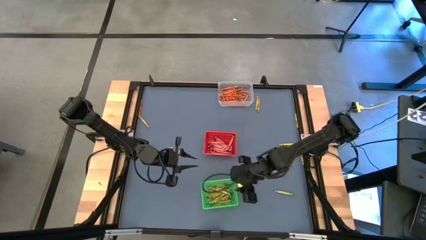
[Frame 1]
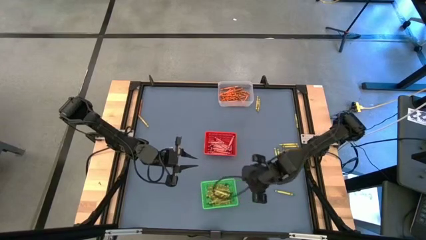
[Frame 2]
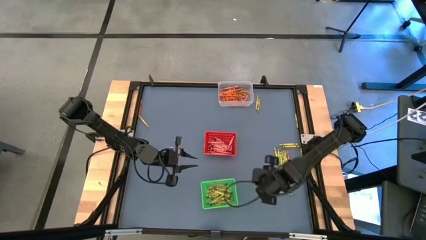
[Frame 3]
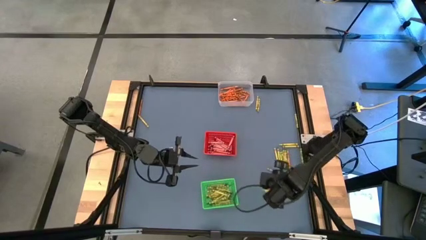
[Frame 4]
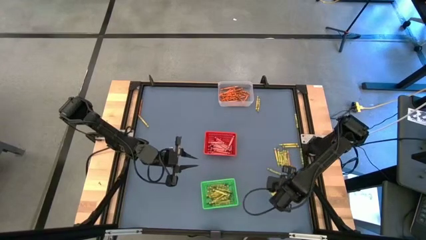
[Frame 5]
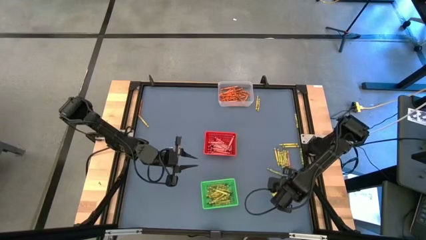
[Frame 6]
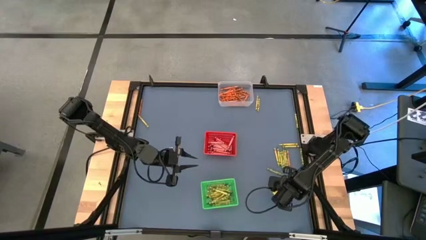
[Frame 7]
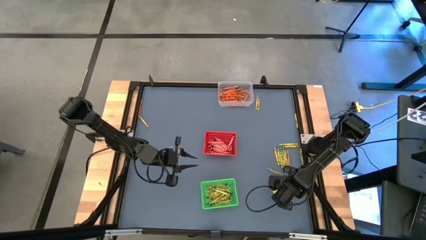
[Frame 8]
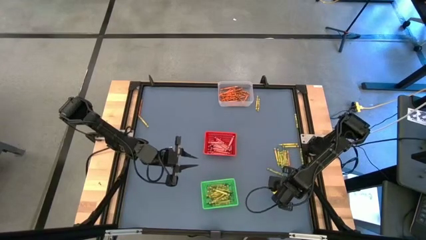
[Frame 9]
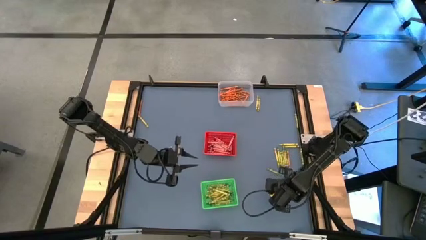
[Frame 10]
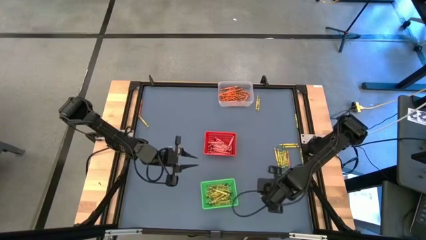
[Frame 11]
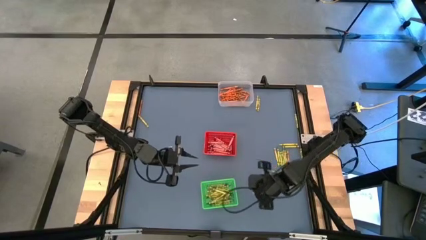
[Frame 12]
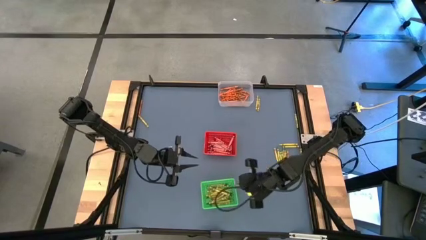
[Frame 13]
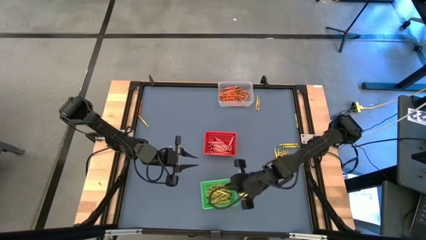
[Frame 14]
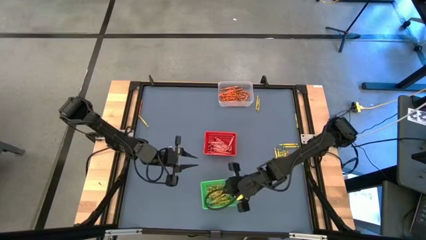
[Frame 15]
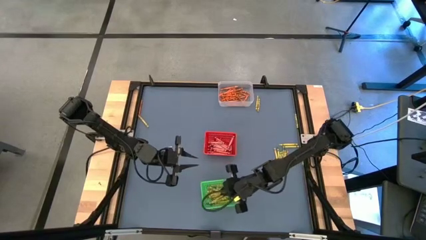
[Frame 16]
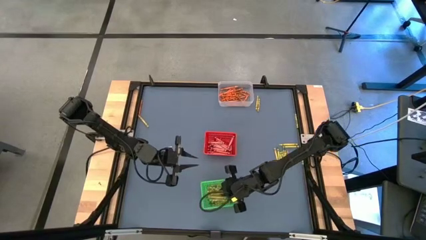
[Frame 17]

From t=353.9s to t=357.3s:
Task: Sort crayons
Put the green crayon into the green bin

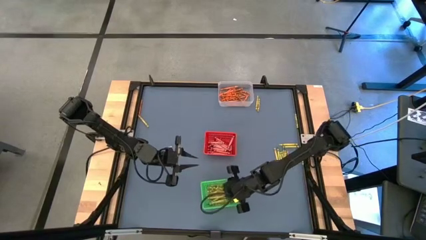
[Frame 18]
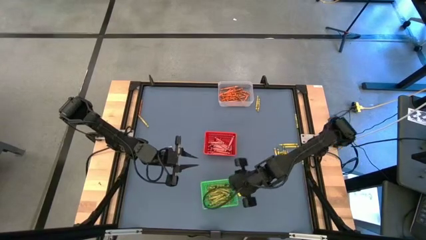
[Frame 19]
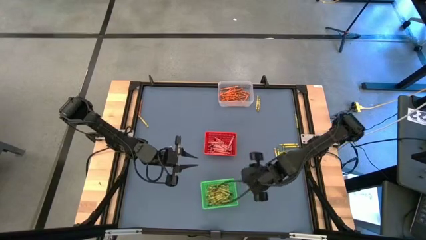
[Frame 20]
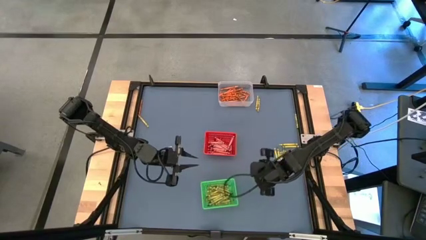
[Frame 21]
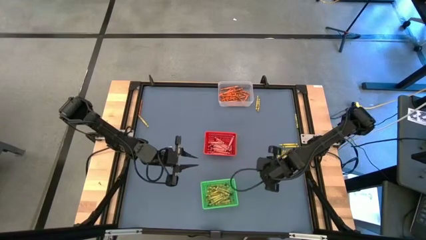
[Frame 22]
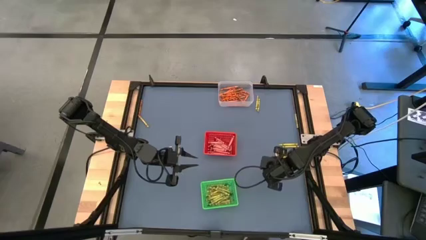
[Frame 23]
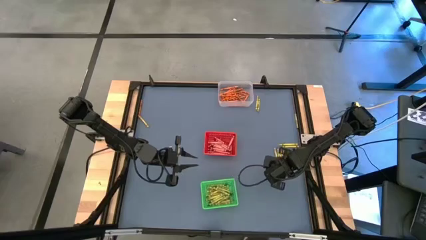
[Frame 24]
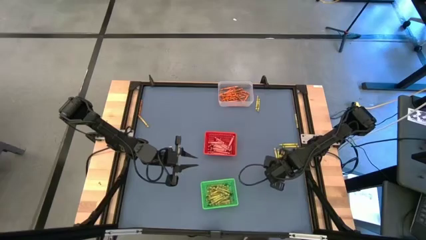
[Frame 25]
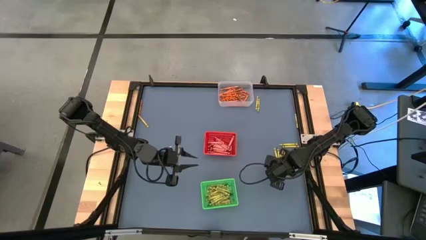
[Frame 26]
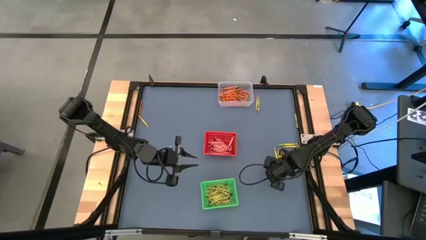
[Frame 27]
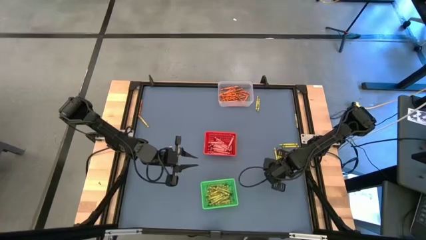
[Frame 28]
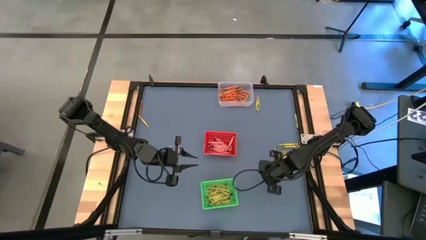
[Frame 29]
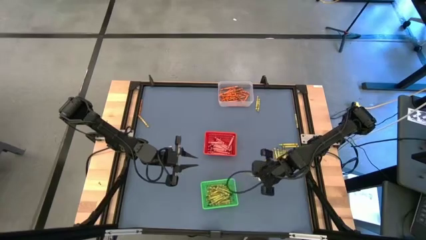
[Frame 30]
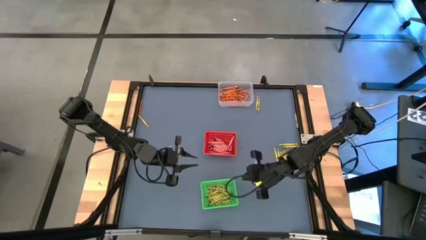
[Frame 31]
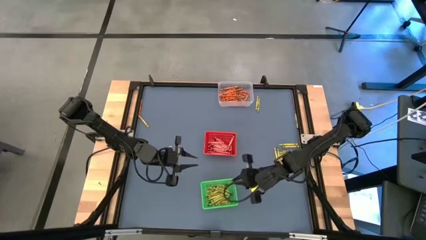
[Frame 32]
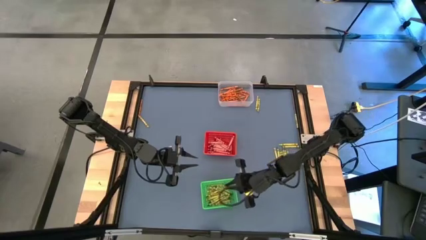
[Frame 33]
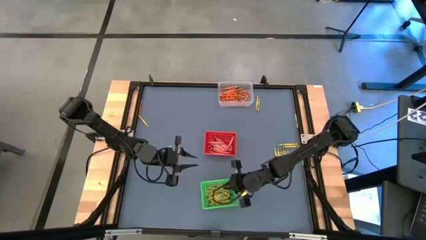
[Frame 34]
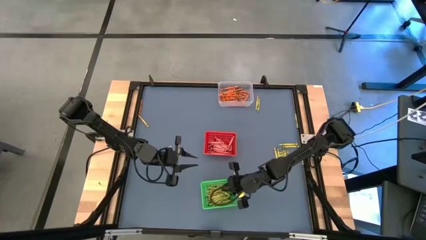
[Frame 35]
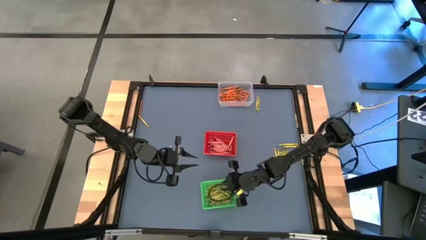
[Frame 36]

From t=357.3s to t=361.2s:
Put the green crayon into the green bin

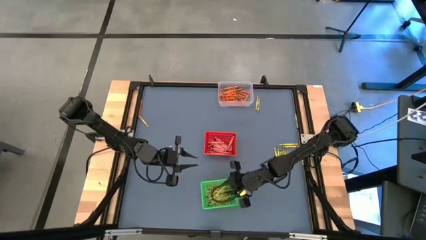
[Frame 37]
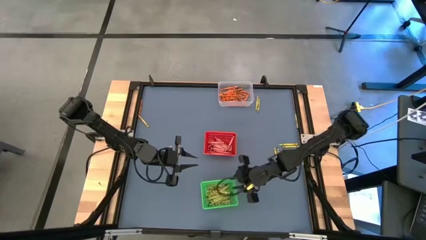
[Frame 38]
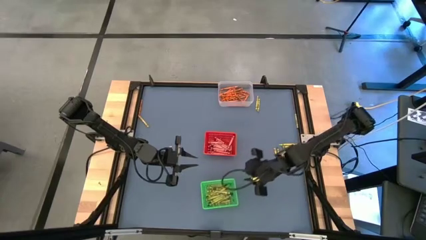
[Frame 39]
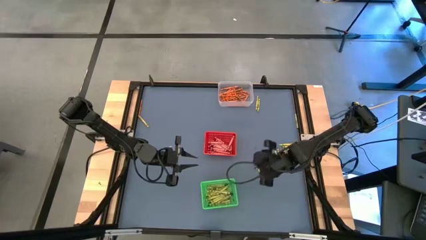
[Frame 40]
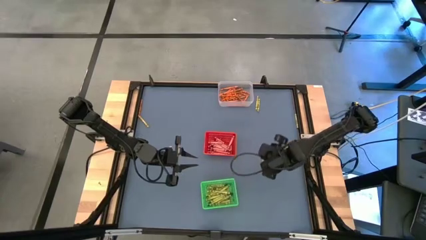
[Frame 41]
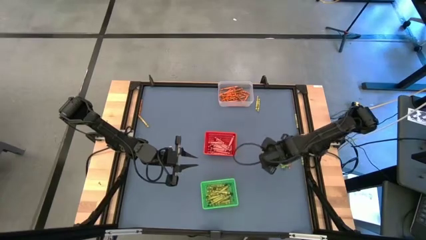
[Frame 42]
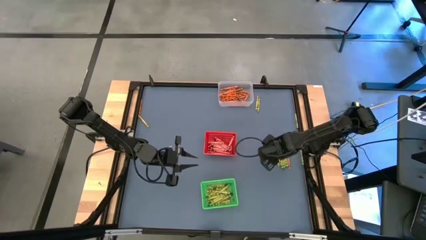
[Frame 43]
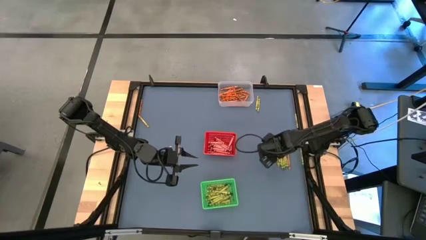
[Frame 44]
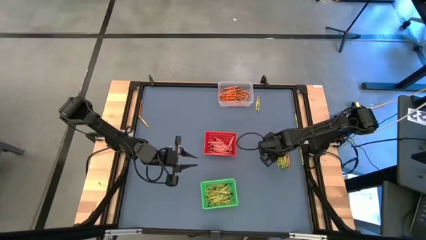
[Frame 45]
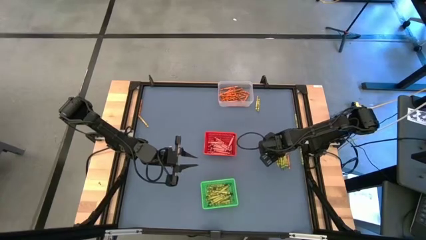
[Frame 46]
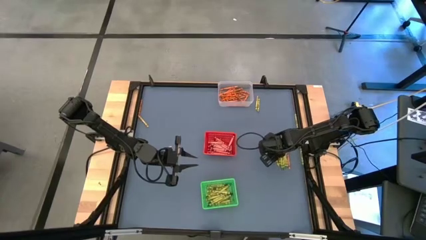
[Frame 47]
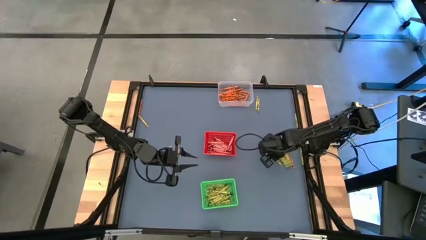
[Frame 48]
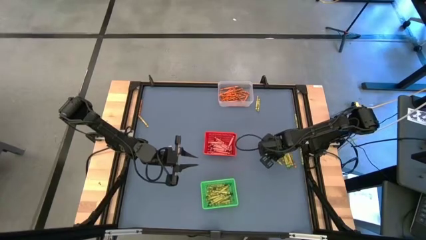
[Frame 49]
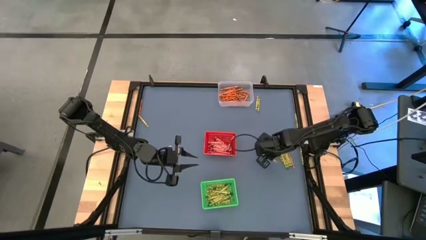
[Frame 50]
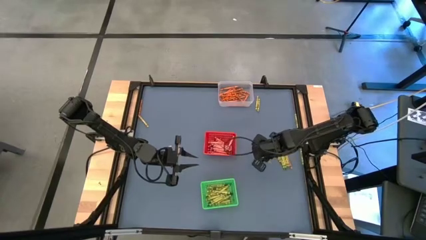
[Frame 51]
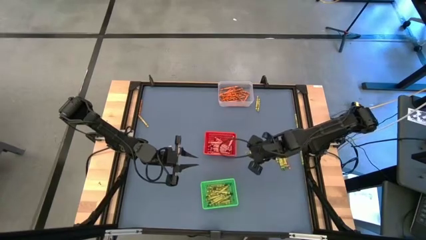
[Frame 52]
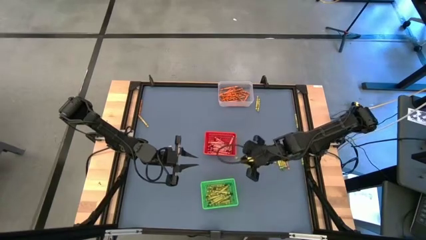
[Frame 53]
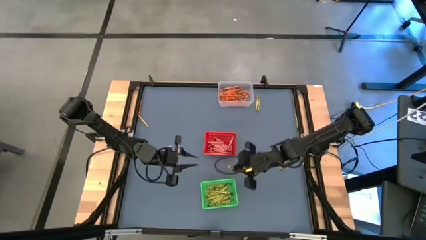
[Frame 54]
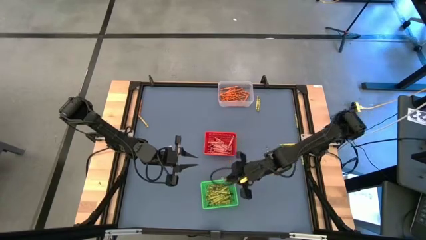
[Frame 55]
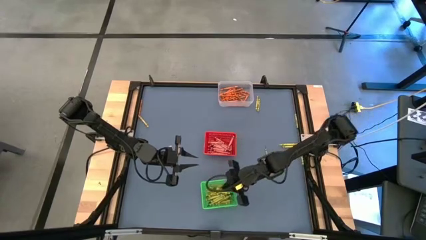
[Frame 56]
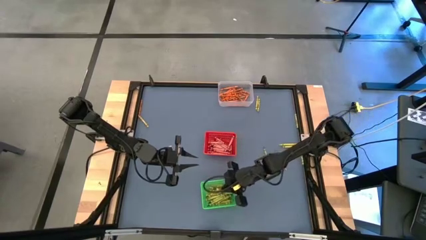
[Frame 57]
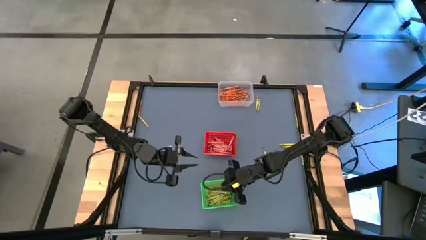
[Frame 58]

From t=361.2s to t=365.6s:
Put the yellow crayon into the green bin

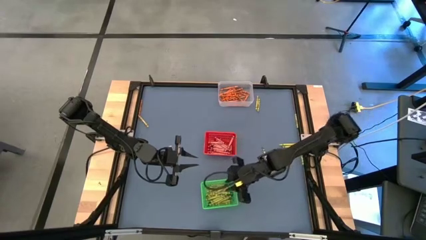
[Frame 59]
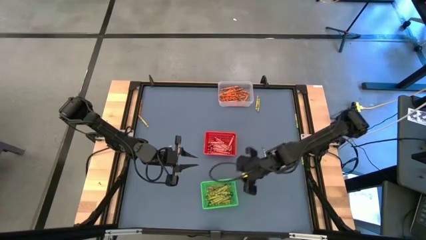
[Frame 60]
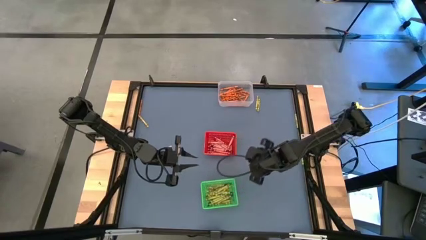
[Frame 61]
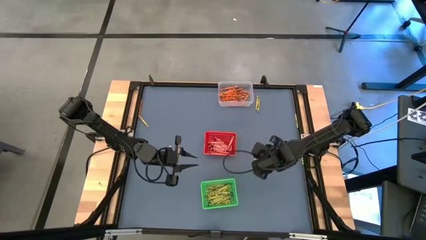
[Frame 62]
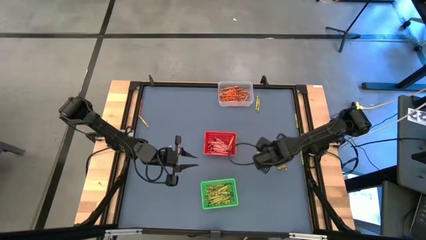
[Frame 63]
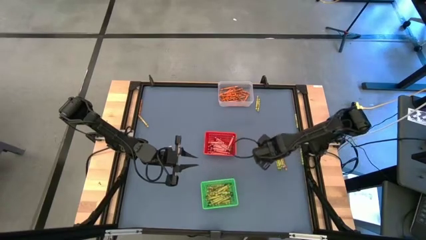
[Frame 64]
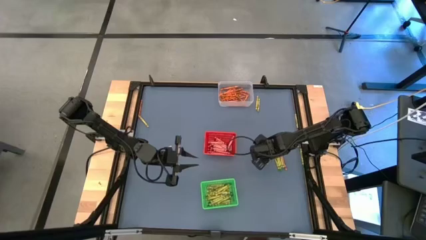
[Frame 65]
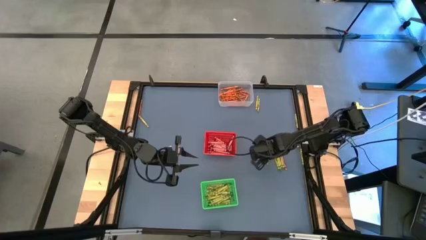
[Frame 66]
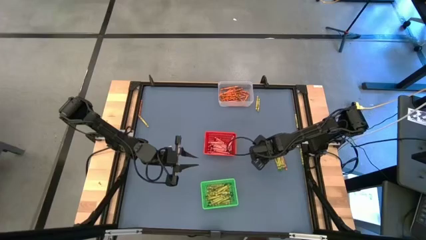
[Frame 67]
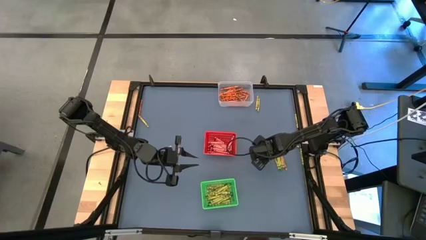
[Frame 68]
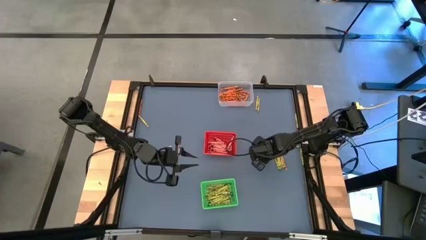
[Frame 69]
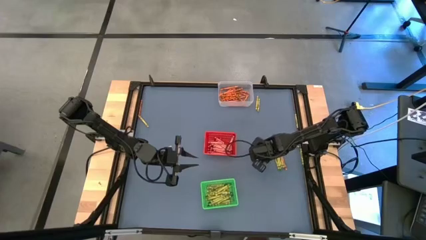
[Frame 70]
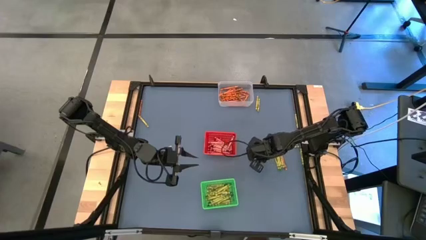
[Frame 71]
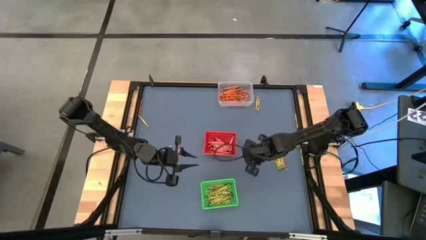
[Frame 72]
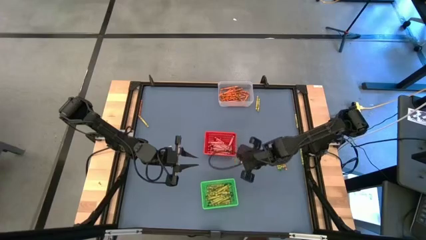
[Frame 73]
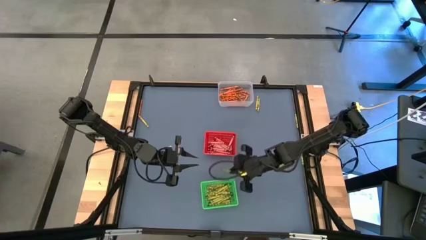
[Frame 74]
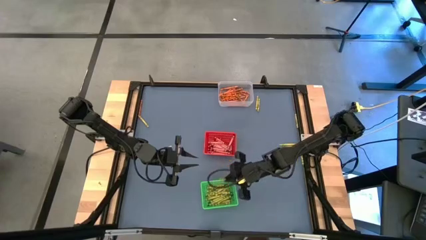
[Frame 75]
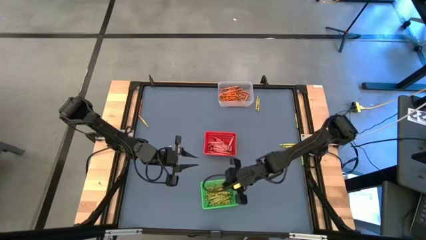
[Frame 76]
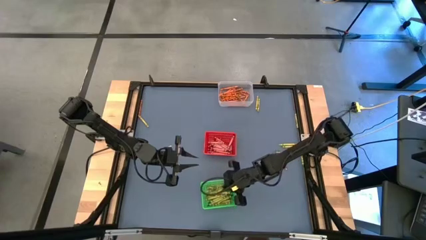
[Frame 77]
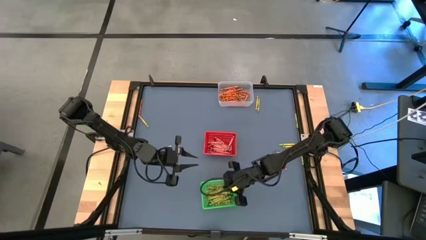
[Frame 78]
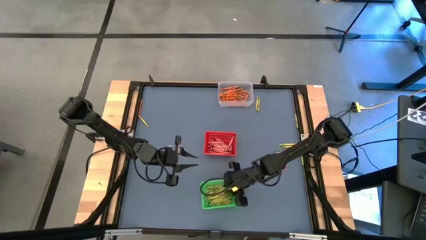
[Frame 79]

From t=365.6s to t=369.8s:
Put the green crayon into the green bin
